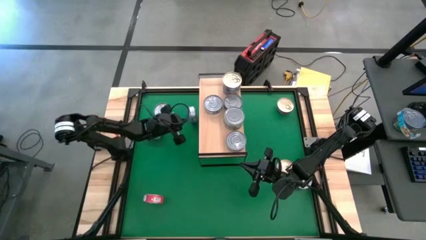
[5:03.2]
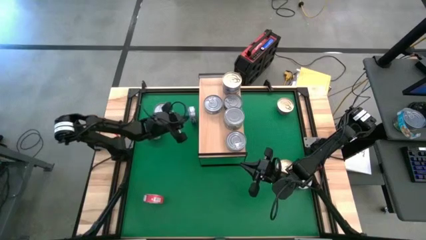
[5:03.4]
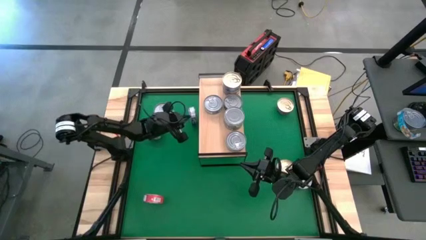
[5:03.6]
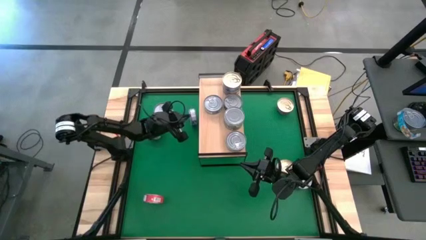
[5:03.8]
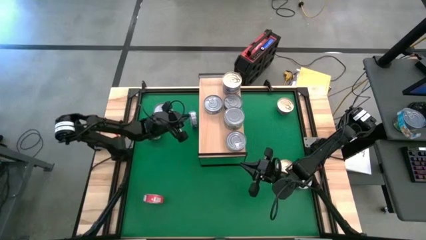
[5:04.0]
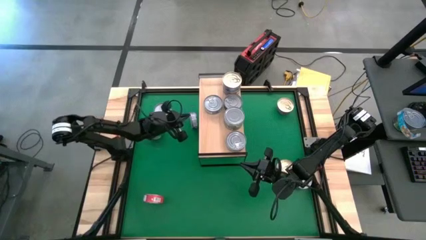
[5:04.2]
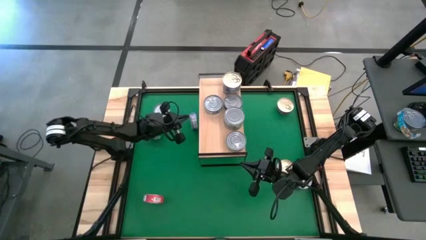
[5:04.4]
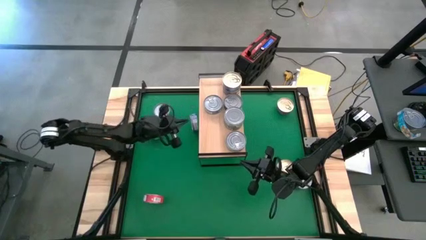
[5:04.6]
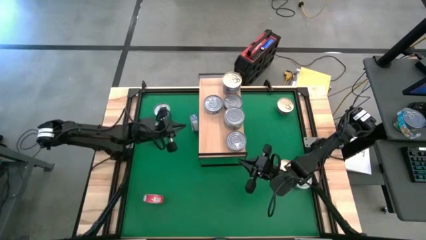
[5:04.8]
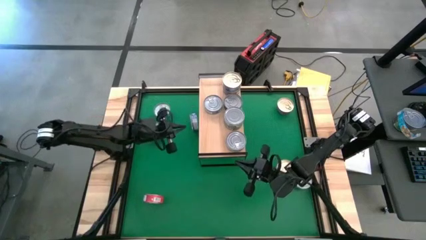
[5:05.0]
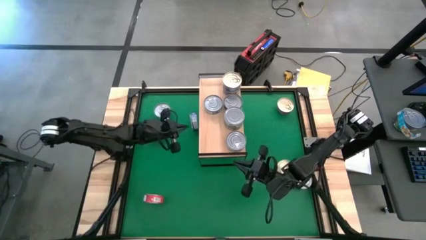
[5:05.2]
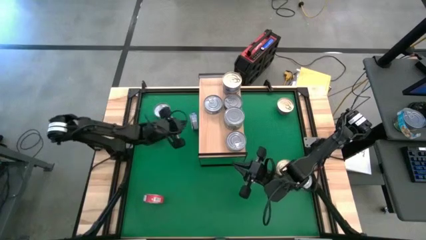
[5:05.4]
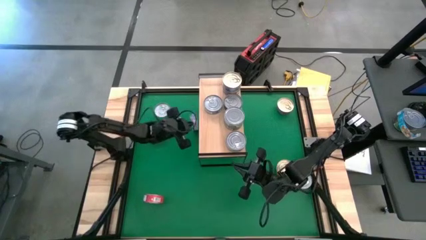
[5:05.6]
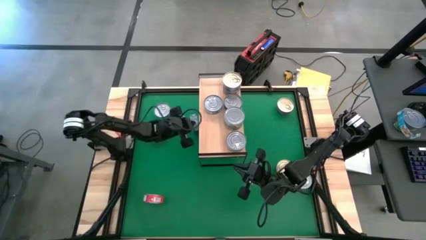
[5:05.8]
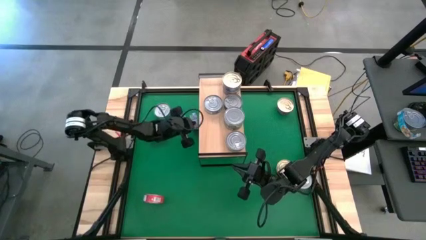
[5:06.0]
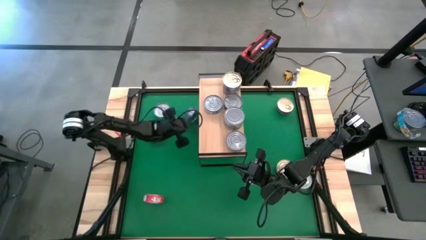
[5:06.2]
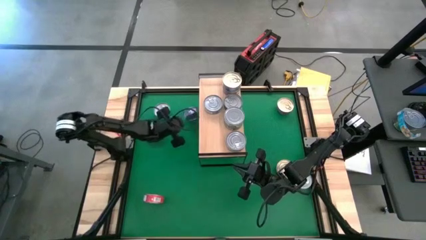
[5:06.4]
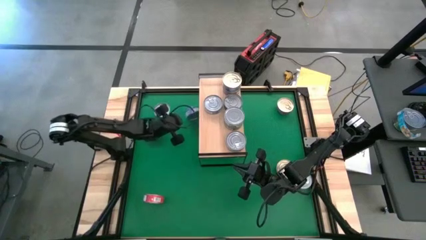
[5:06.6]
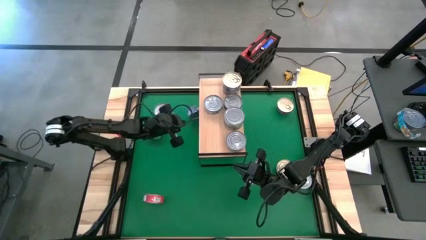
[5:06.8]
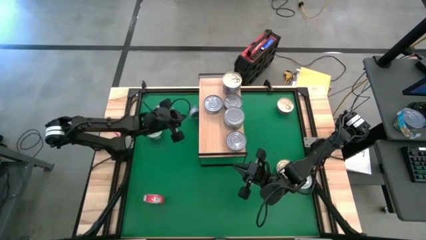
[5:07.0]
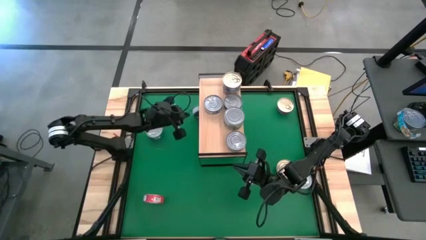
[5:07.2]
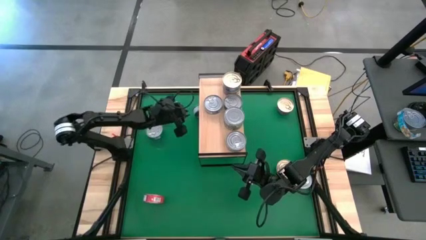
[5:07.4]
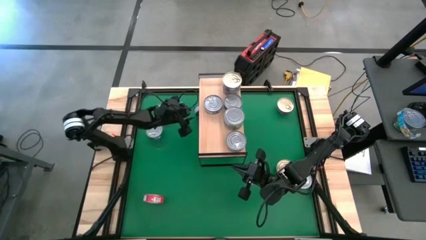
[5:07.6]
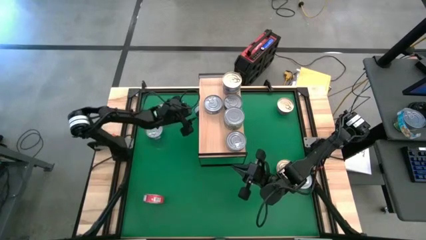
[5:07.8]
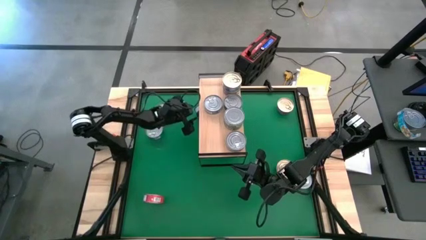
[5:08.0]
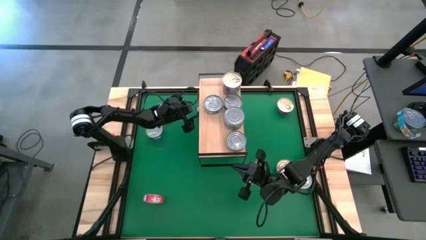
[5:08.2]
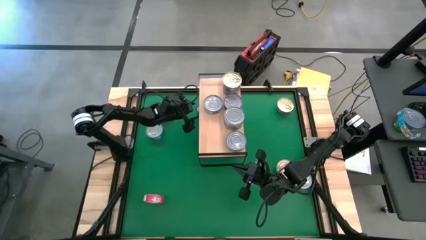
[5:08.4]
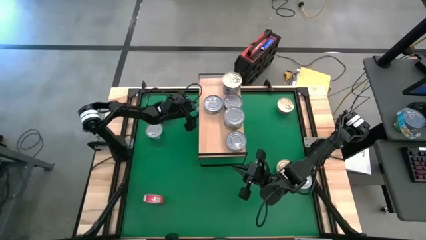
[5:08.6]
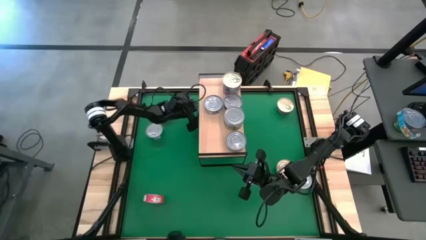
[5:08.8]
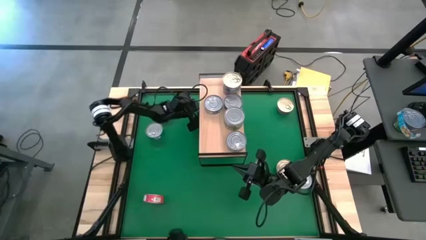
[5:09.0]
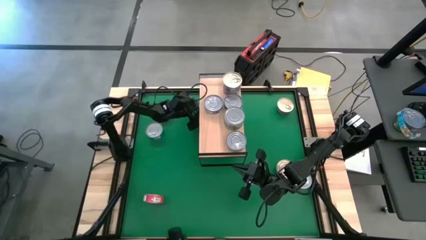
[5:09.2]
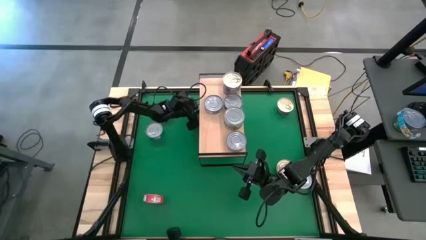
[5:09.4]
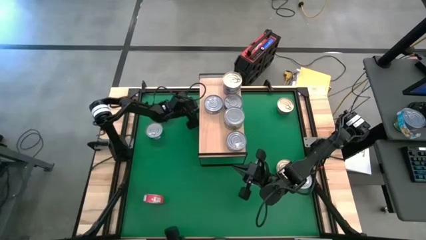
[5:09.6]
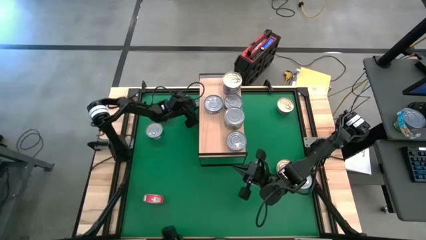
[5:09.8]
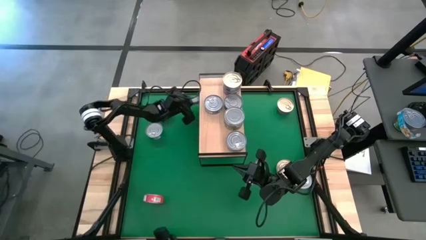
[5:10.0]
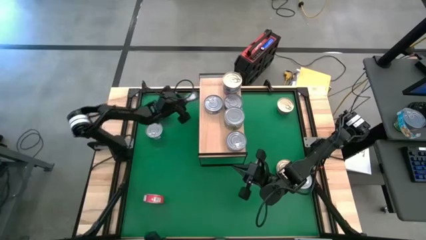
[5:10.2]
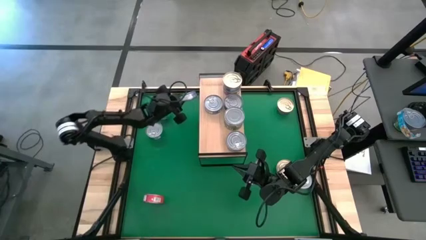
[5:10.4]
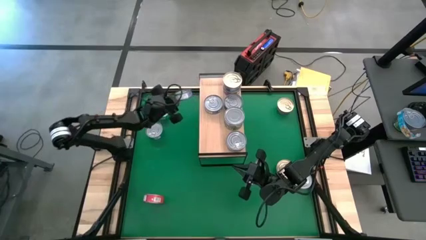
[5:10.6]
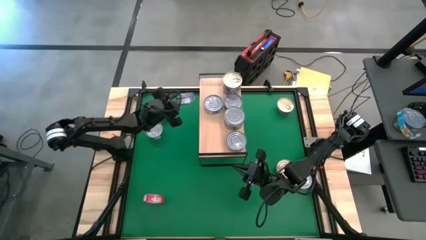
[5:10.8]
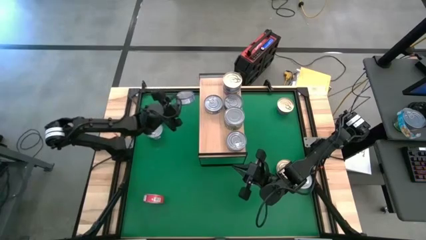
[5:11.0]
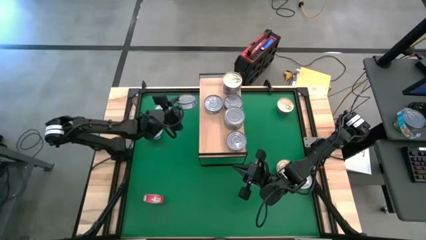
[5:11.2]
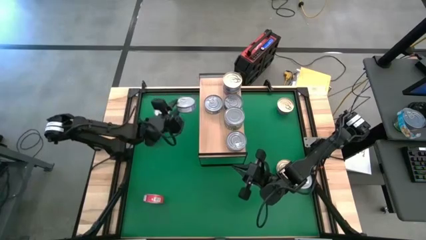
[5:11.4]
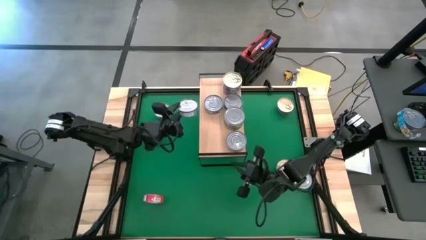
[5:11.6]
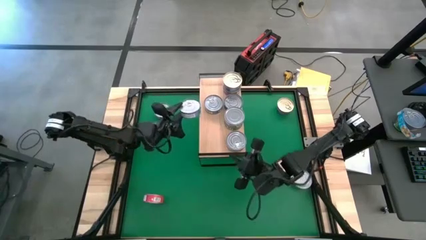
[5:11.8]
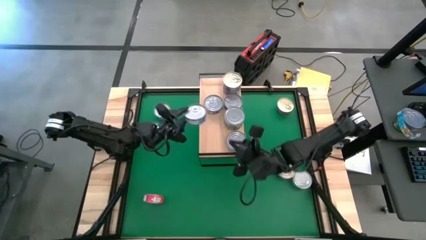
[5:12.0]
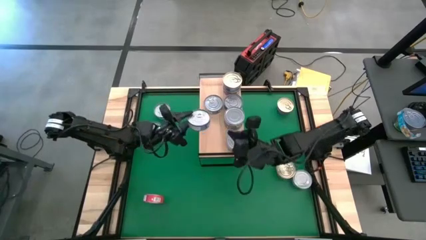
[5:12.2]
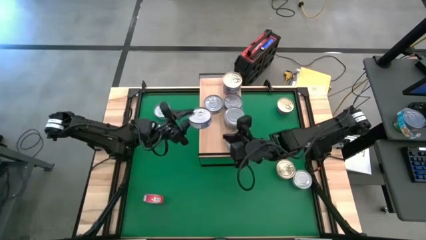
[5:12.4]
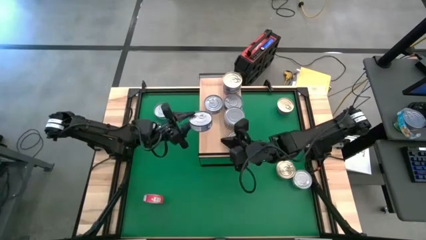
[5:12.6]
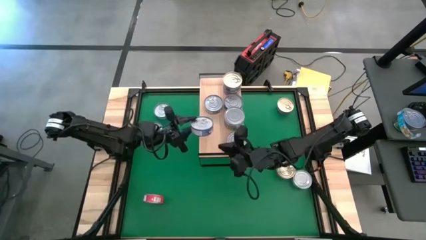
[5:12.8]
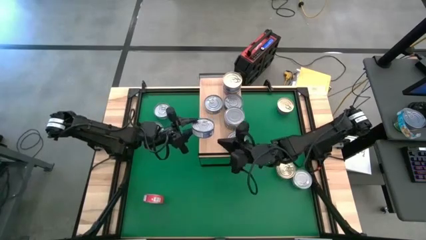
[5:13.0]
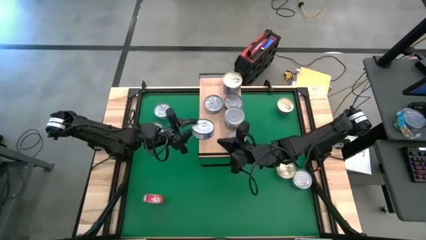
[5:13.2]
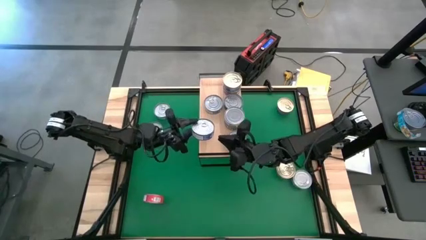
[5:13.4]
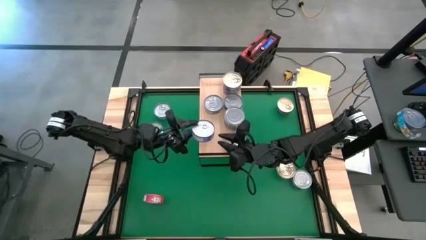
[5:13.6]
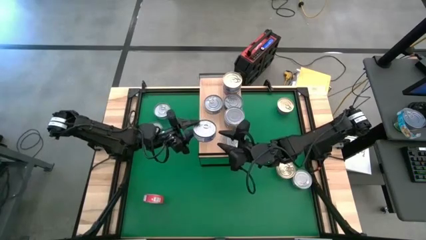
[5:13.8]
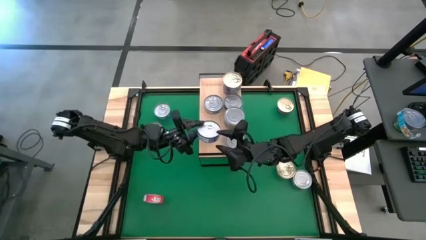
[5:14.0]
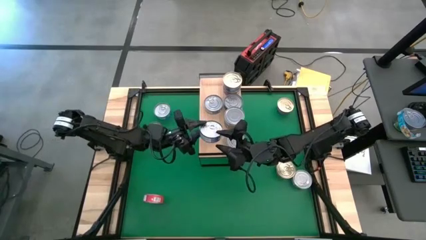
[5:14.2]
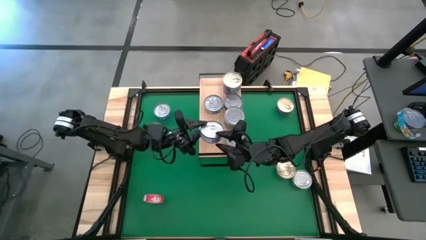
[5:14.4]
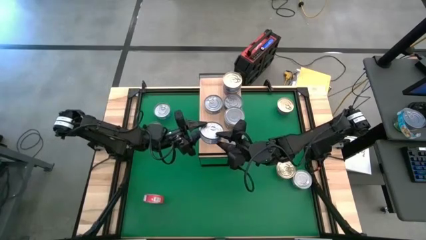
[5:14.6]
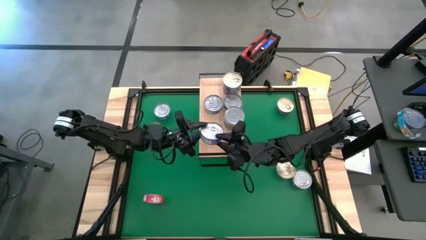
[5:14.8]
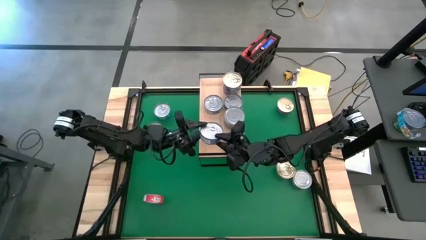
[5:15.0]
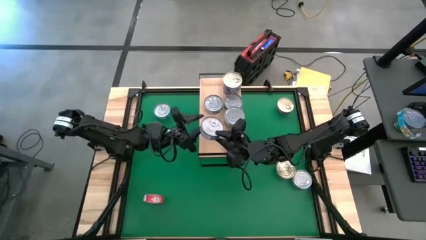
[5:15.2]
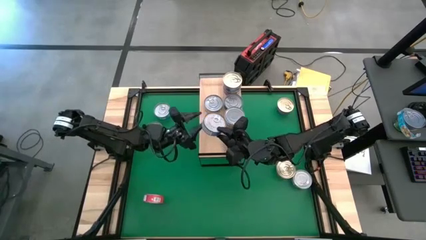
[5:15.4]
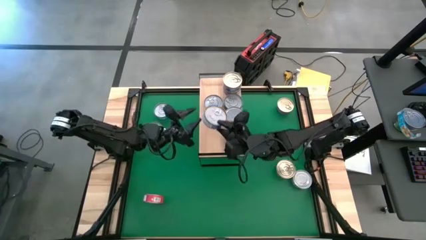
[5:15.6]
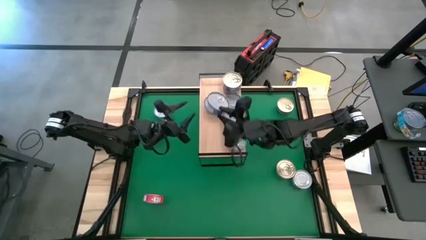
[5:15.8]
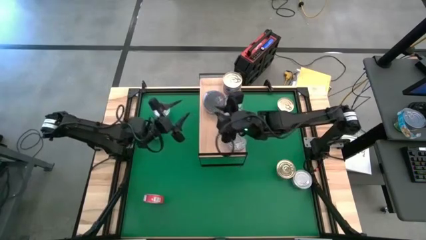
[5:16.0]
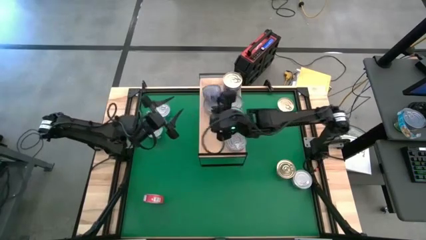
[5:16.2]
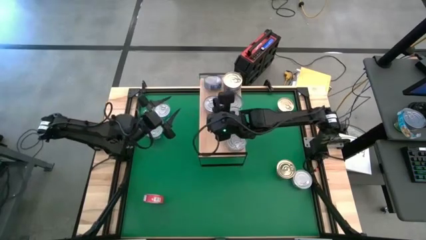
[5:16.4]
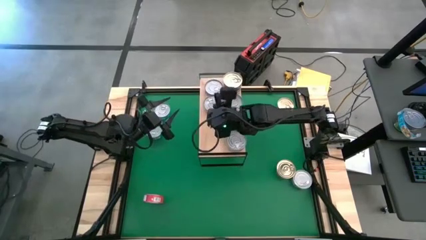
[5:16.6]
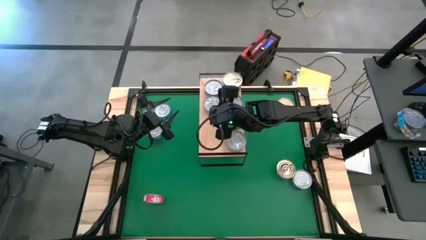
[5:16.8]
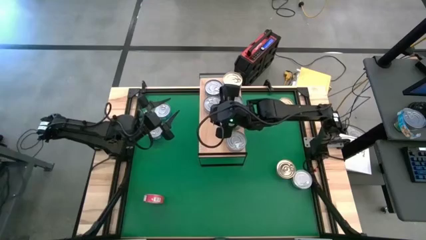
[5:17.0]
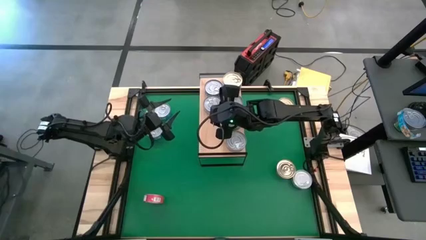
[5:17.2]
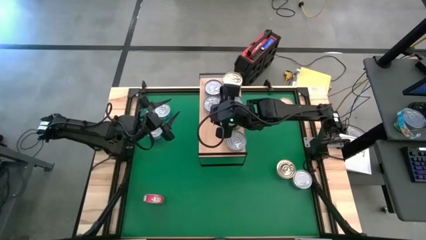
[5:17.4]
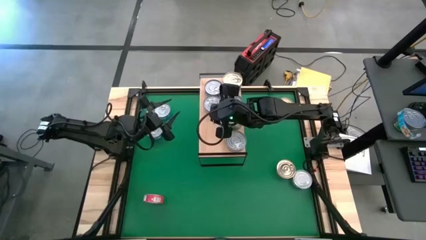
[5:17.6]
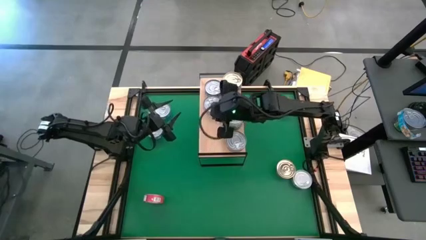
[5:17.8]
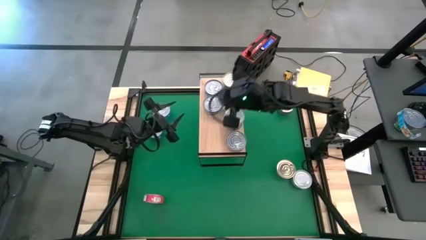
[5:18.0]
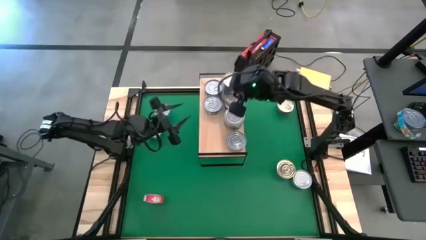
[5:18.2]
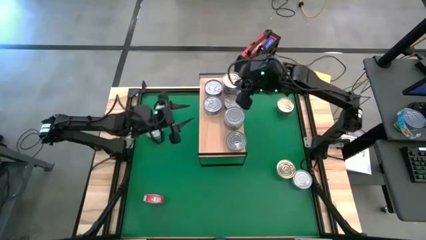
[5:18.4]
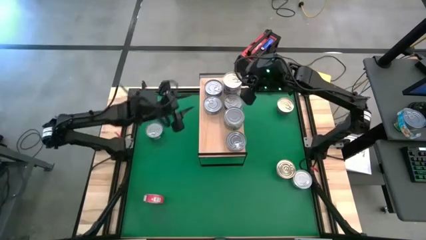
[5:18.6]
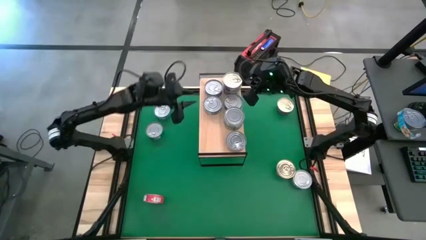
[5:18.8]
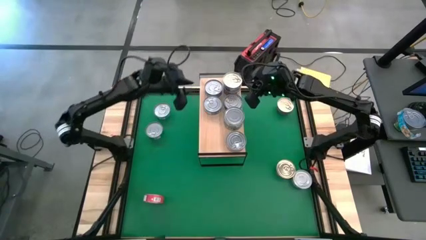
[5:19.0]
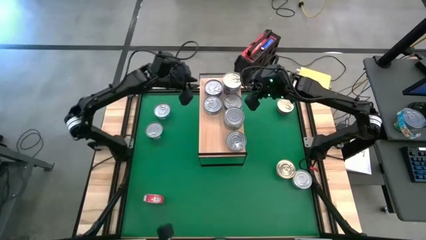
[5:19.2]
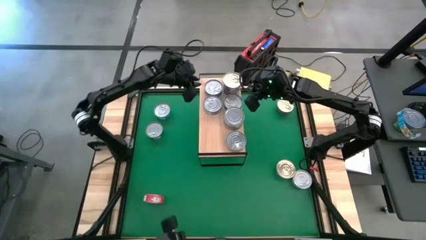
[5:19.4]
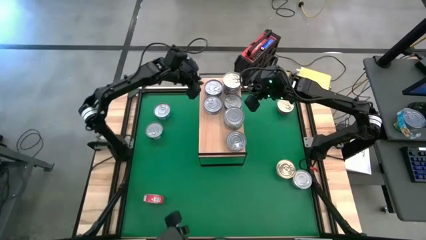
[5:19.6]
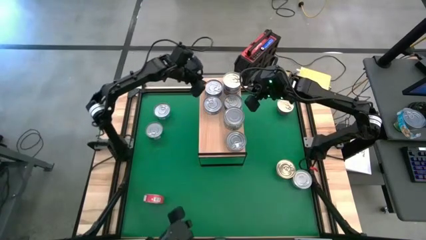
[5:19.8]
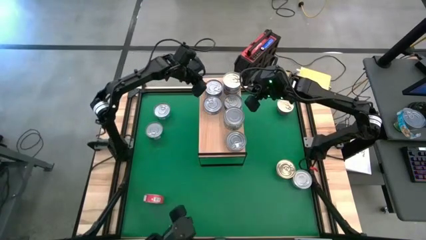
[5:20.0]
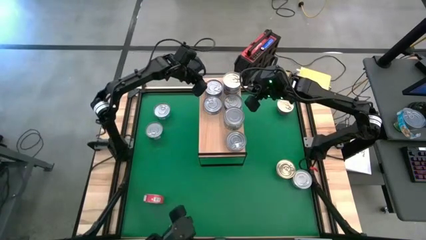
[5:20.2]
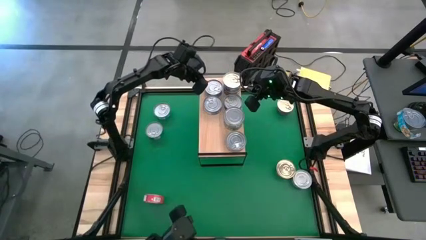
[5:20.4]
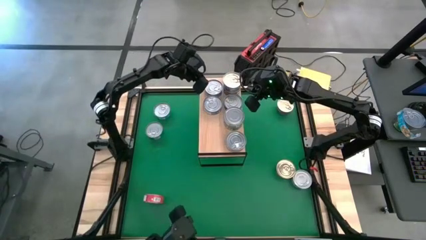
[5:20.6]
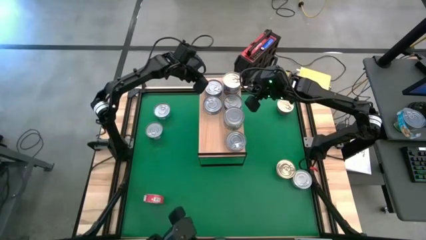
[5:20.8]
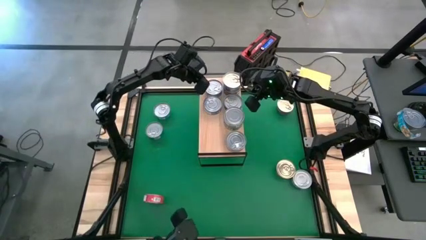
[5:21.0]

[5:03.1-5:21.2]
Task: Stack canned seafood by type on shelf
Stack the blue tuna can on top of the blue tuna can on the shelf
